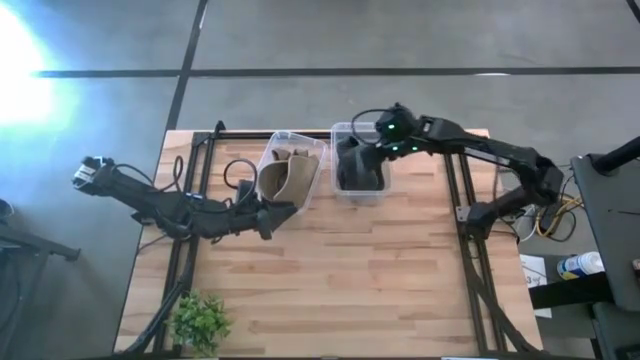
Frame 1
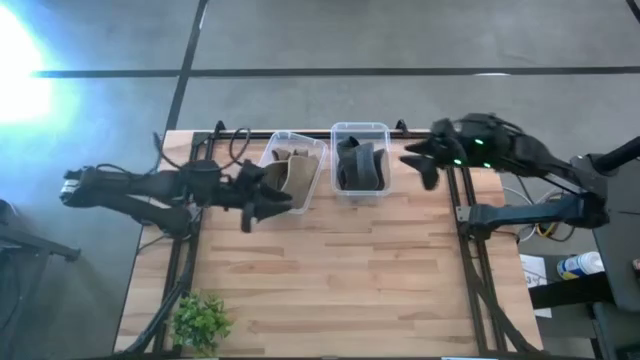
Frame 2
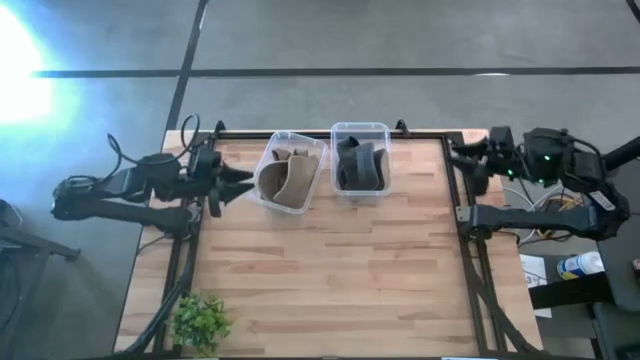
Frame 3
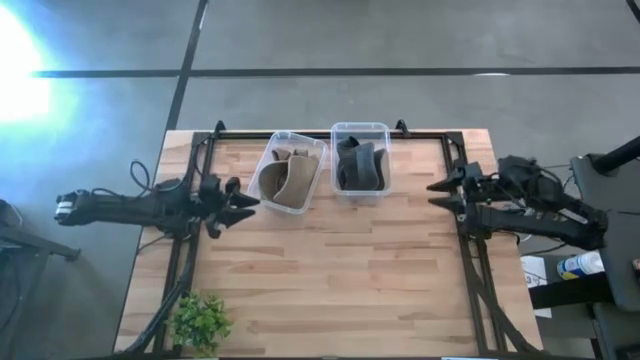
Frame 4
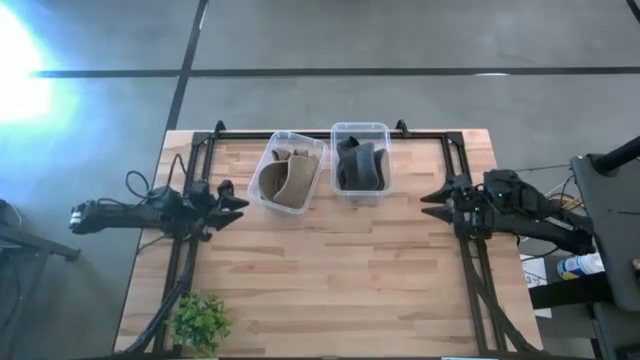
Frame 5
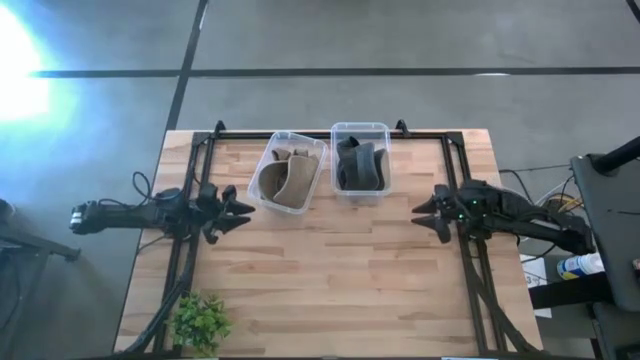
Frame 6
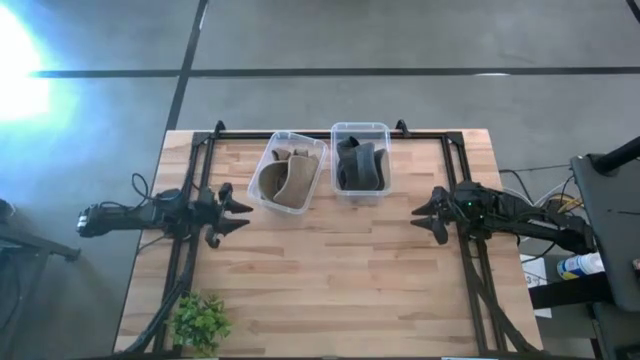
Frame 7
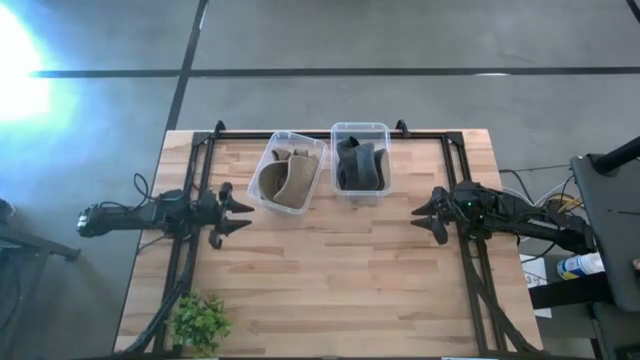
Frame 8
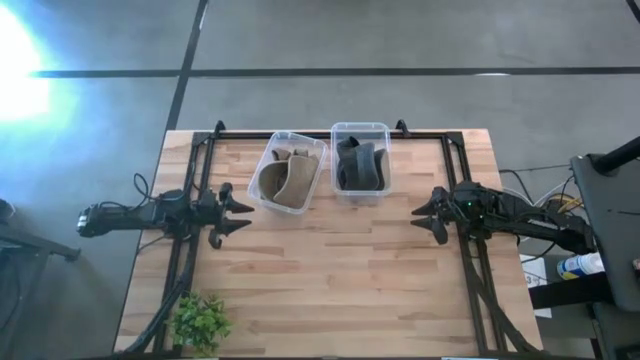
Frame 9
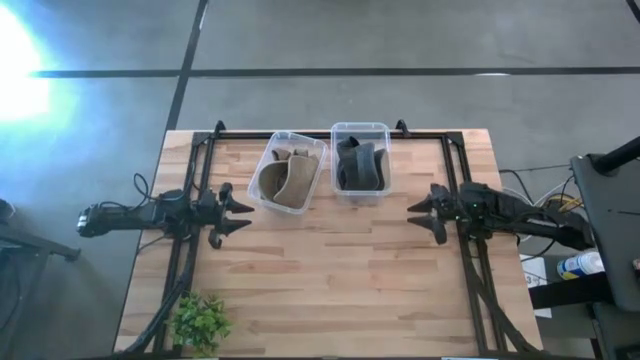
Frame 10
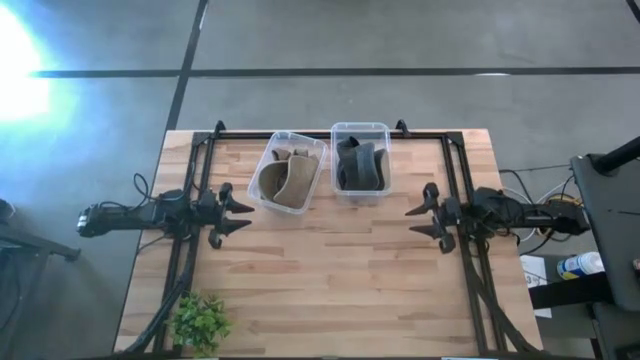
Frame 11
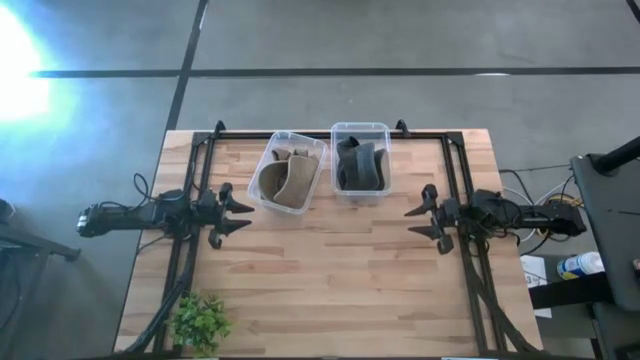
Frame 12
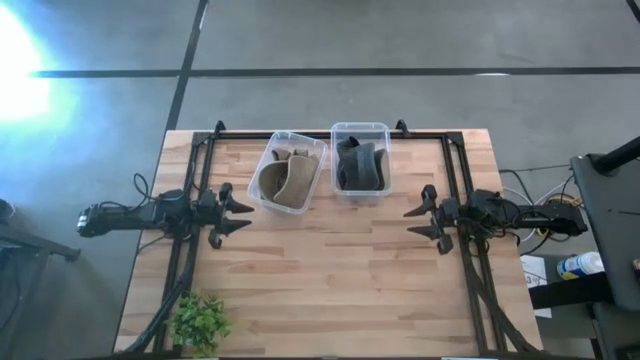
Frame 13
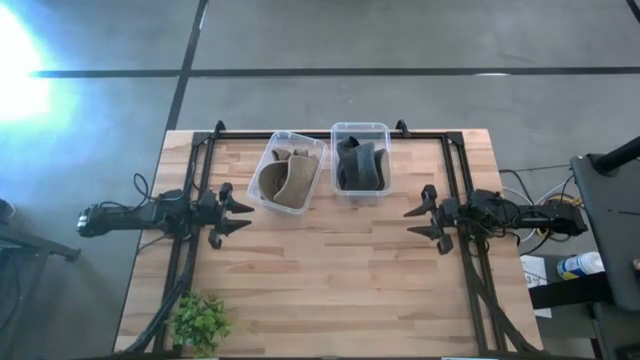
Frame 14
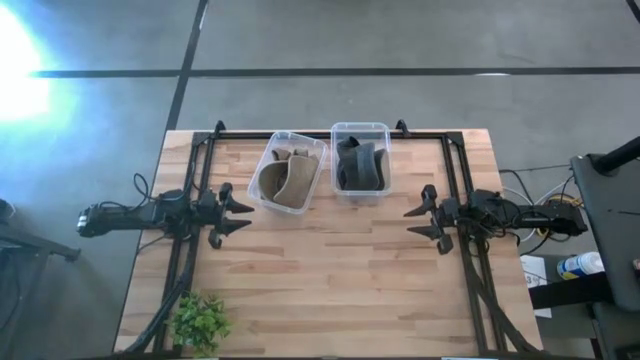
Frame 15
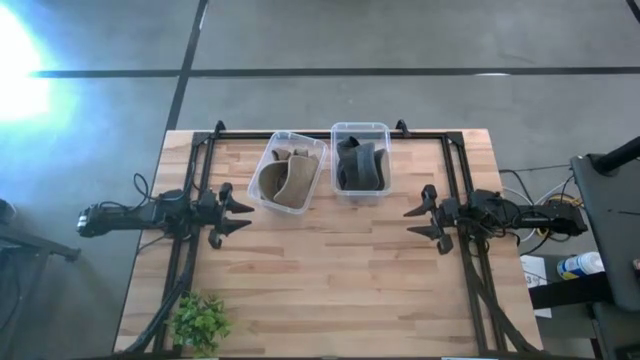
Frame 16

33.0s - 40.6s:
Task: Pick & Place hat
Return to Home Position

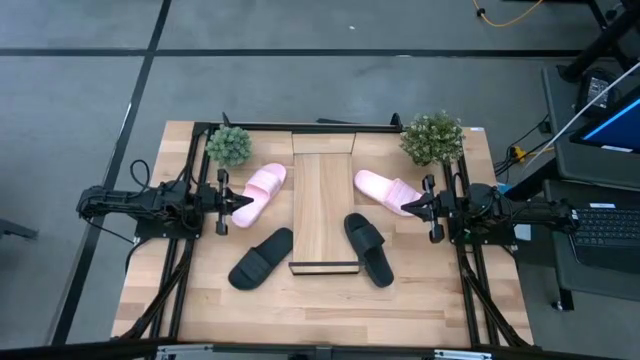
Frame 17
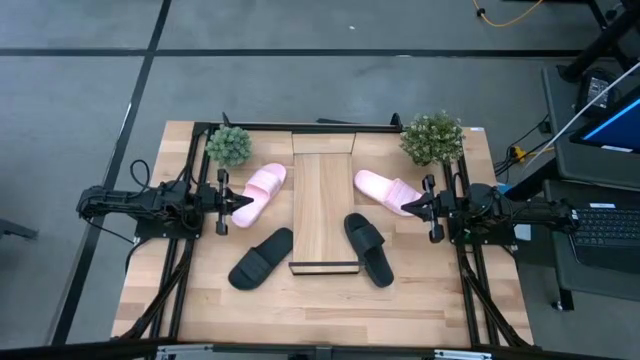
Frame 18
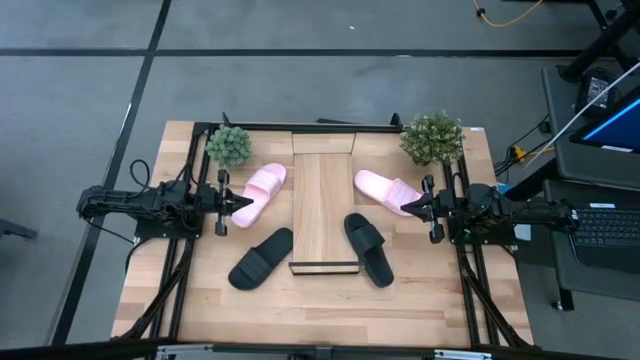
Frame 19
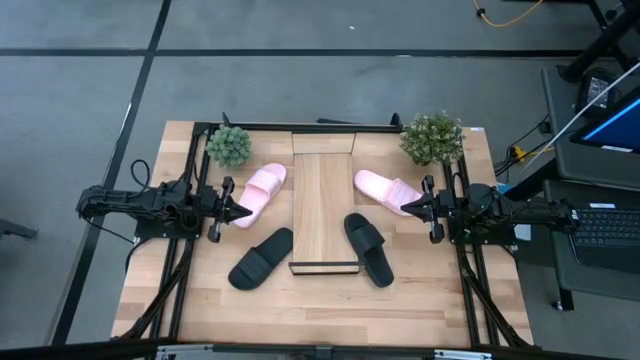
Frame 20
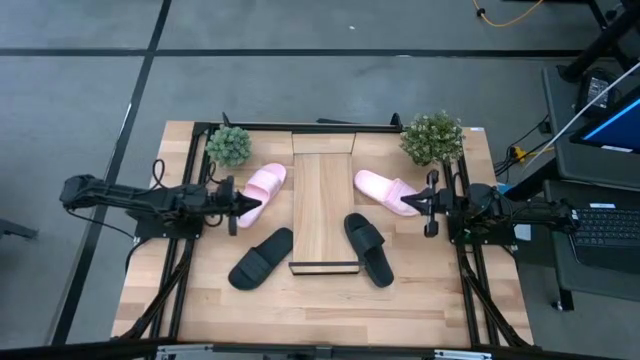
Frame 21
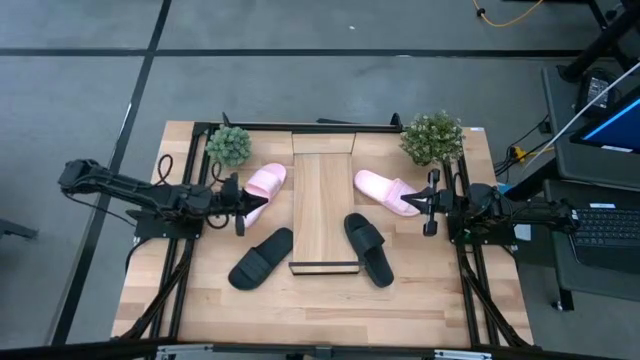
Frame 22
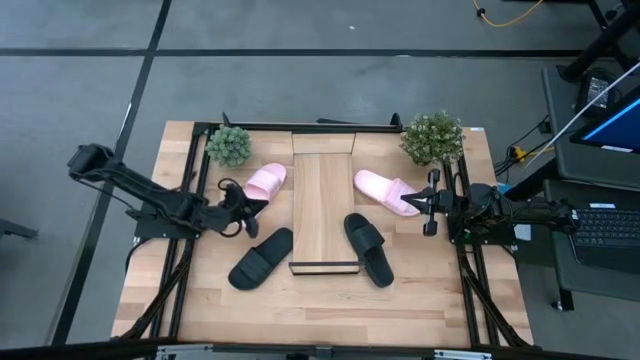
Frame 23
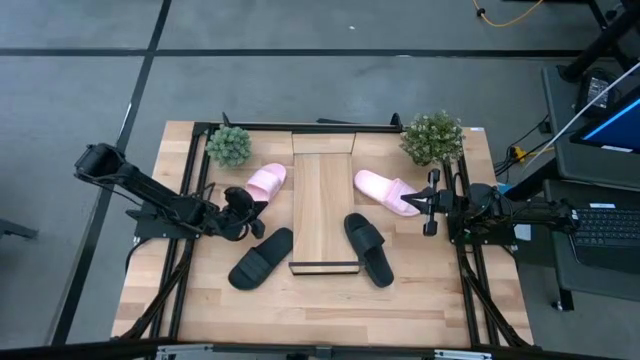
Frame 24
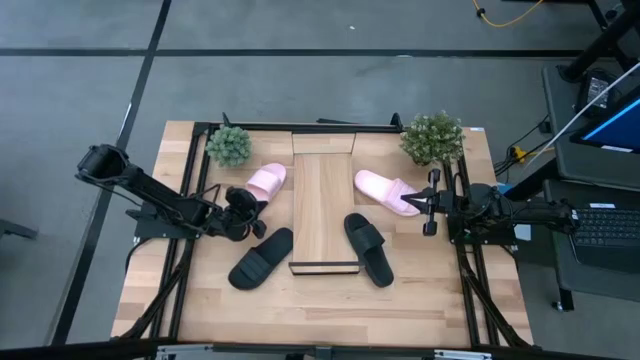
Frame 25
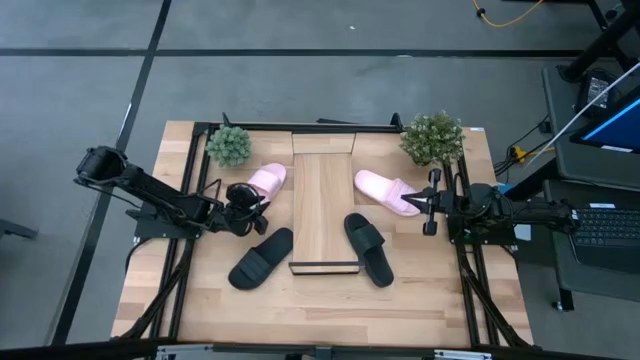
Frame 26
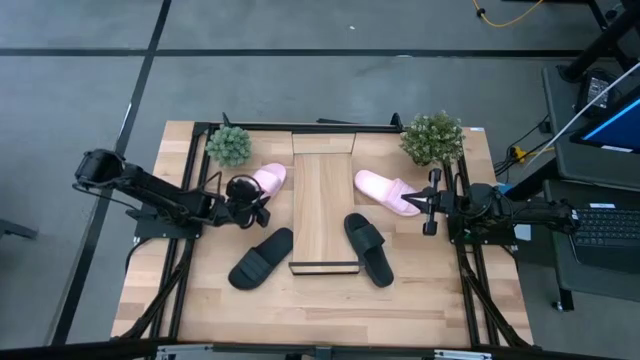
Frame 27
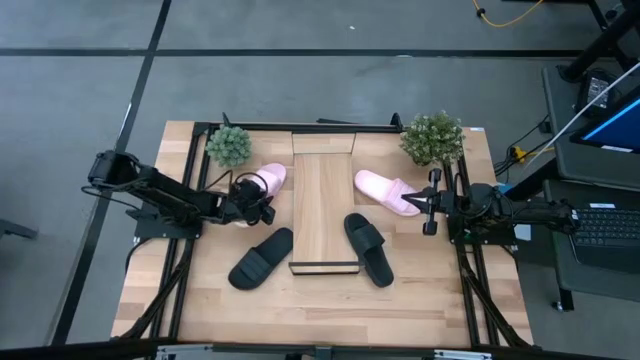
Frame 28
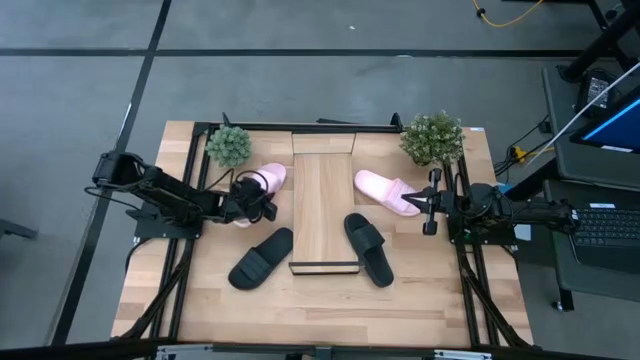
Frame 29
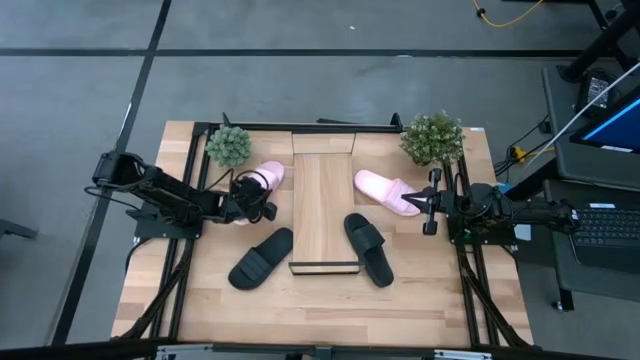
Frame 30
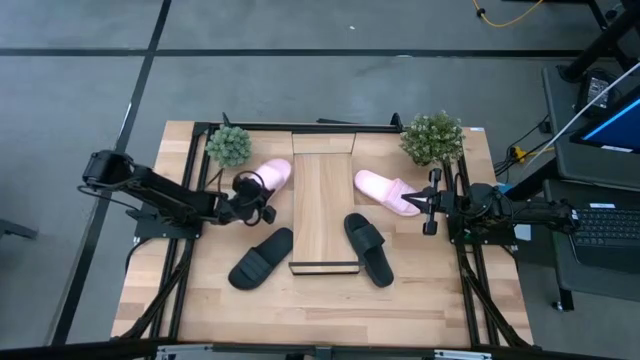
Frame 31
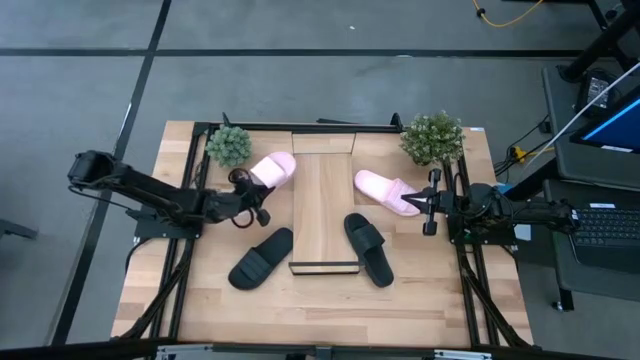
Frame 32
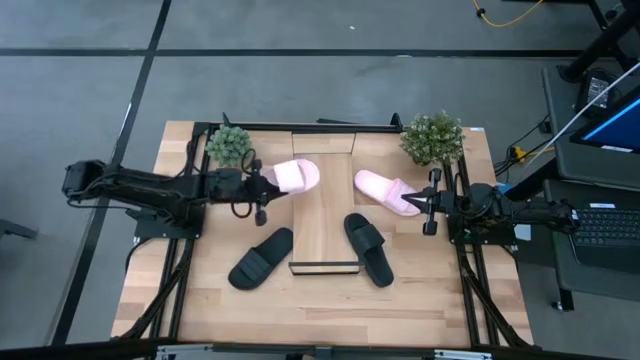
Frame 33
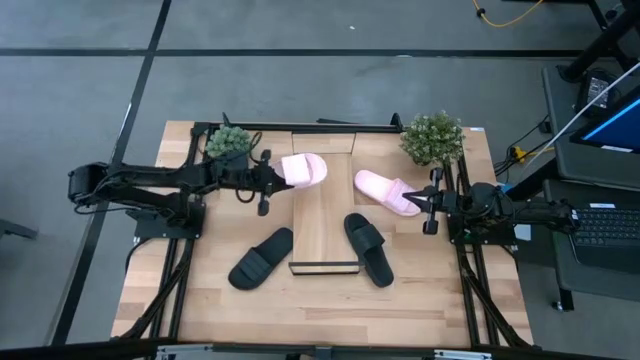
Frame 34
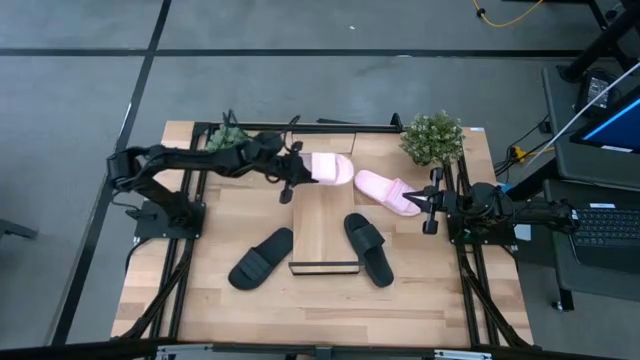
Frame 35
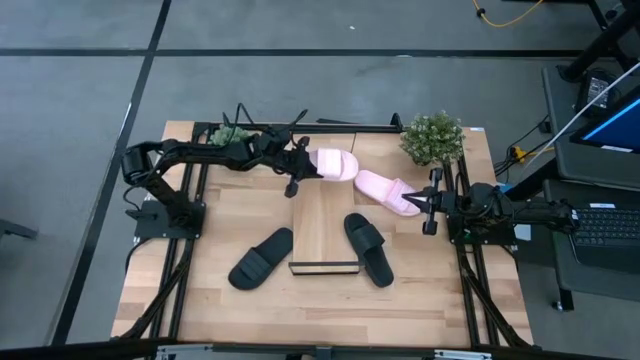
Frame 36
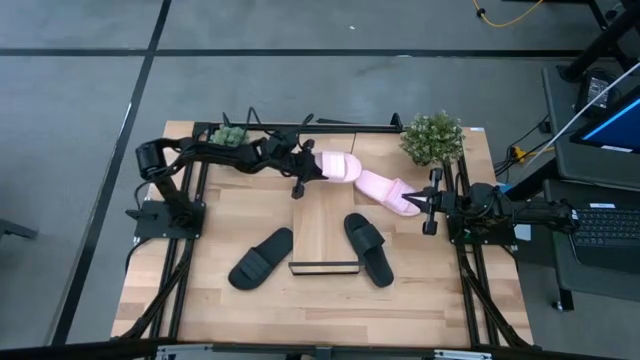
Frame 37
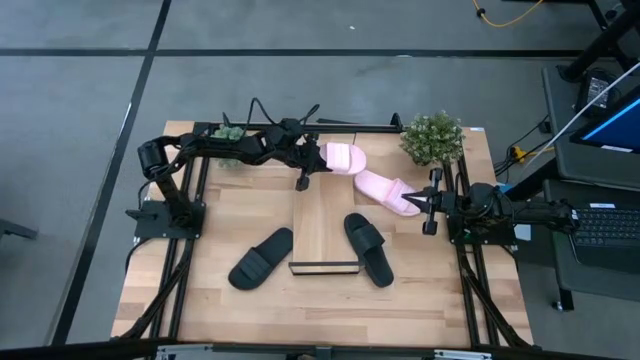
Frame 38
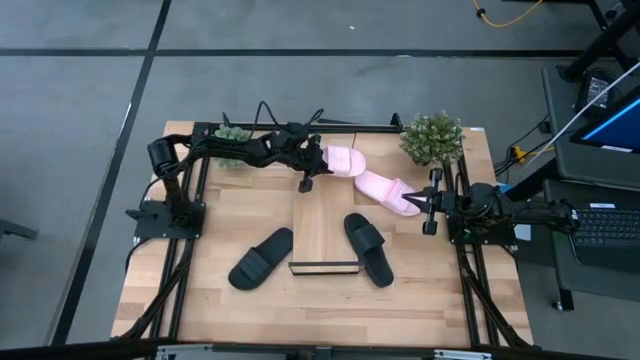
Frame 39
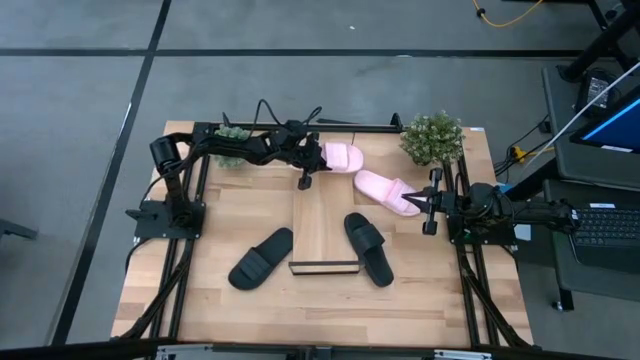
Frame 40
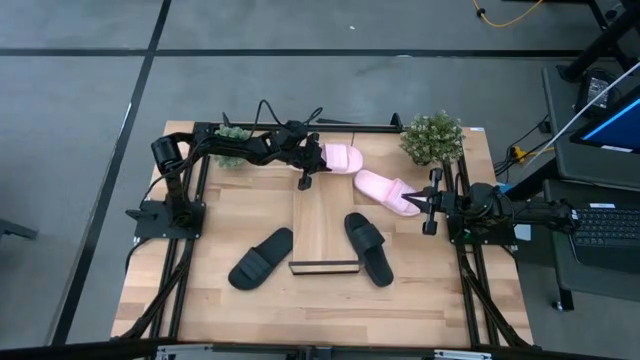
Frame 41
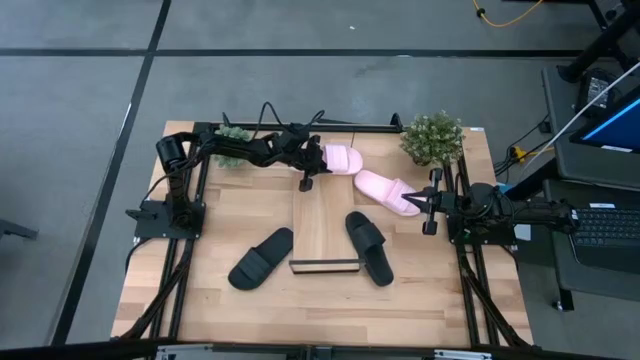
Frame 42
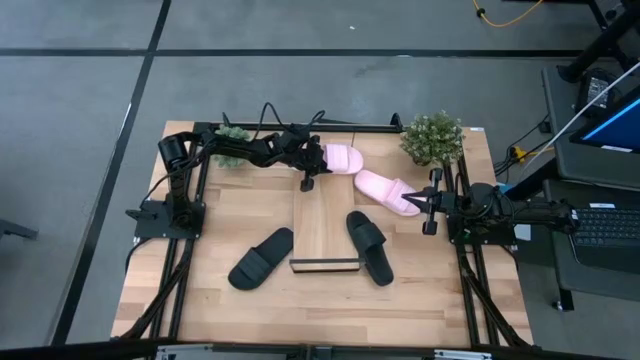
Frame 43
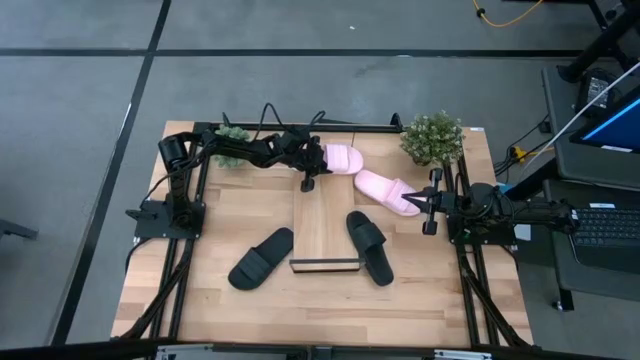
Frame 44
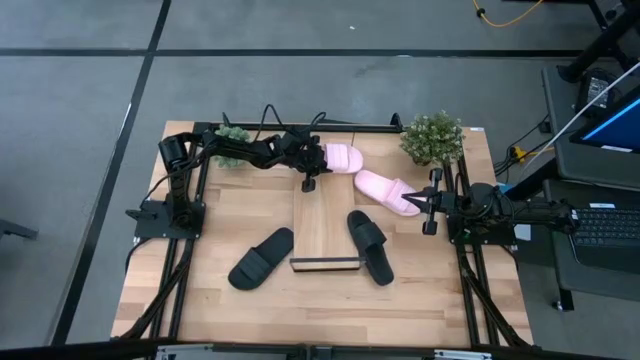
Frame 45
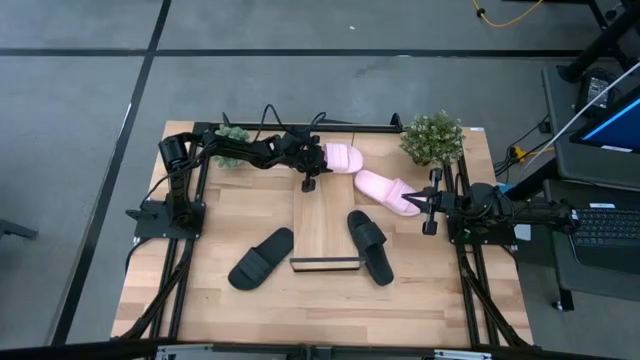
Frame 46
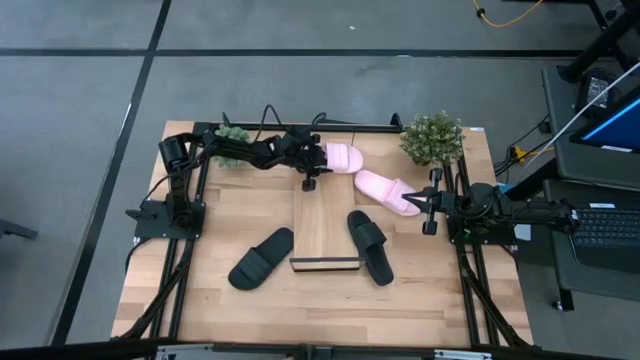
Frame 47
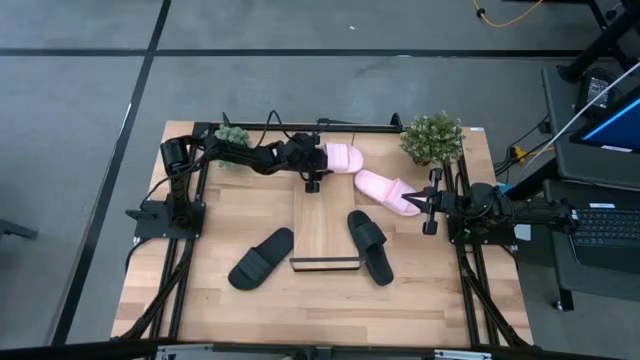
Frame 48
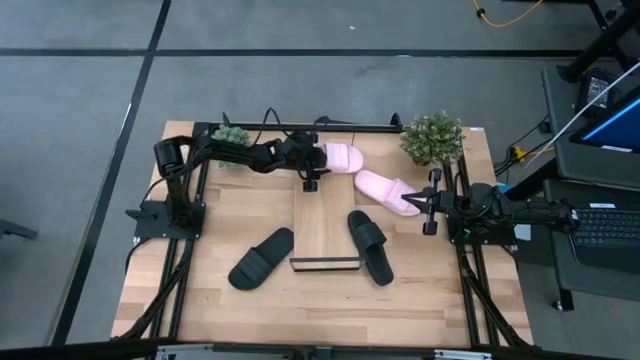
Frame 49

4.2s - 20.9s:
Task: Pick and place slides into the shelf
Put the left pink slides on the shelf
